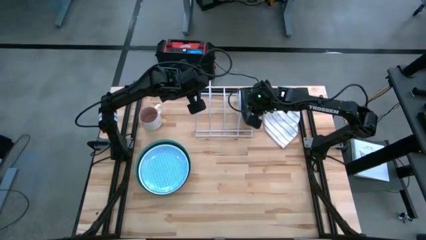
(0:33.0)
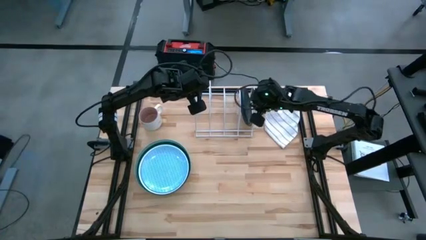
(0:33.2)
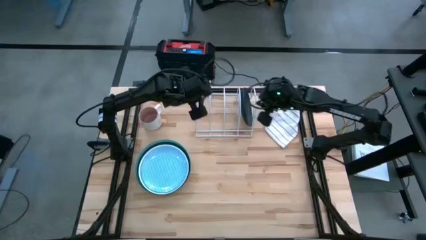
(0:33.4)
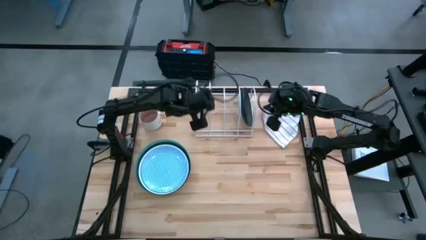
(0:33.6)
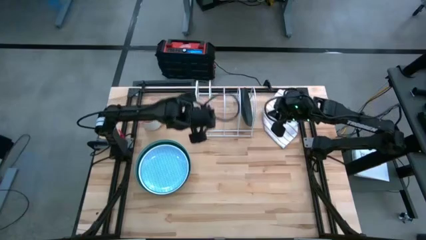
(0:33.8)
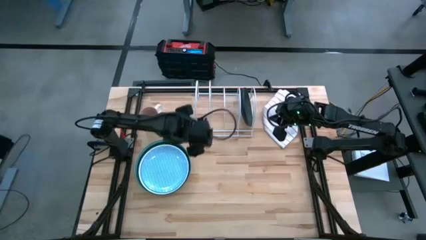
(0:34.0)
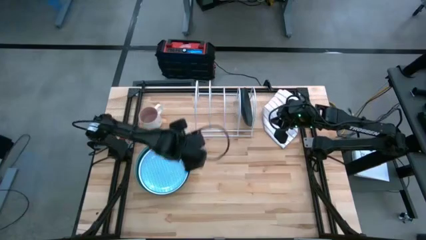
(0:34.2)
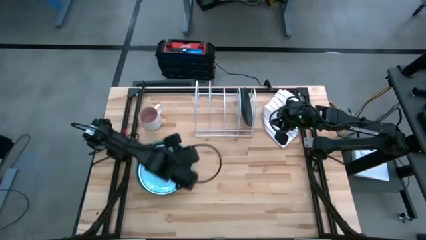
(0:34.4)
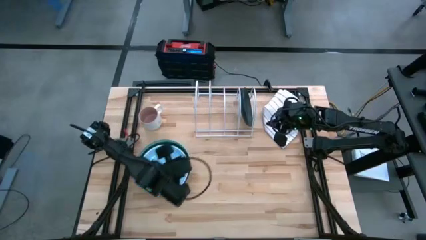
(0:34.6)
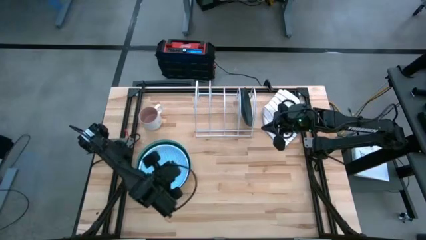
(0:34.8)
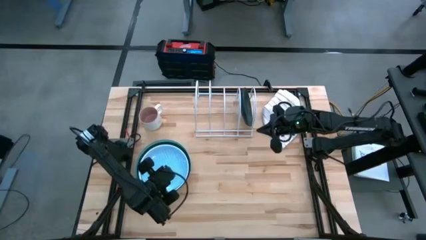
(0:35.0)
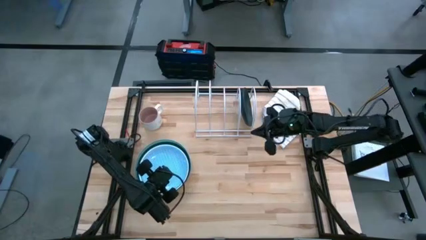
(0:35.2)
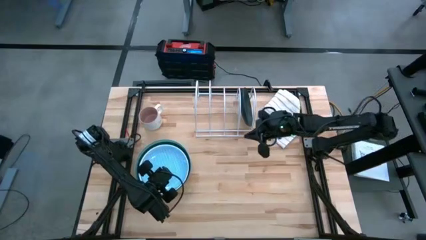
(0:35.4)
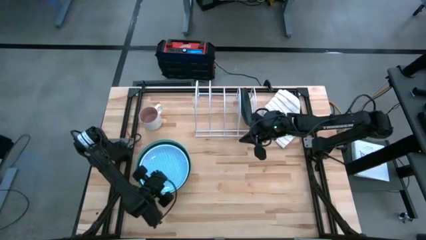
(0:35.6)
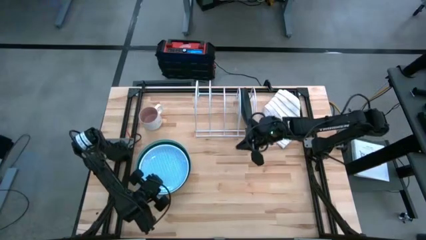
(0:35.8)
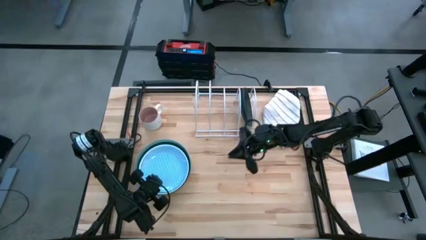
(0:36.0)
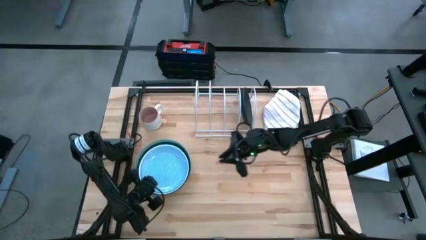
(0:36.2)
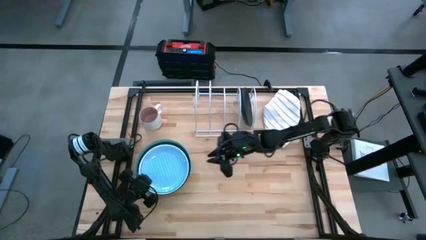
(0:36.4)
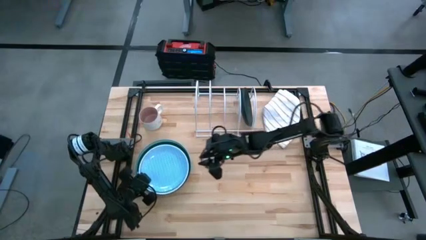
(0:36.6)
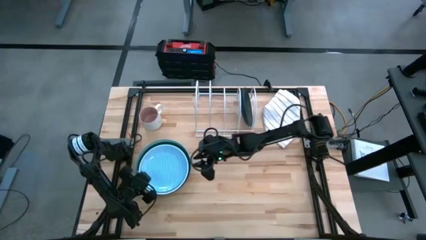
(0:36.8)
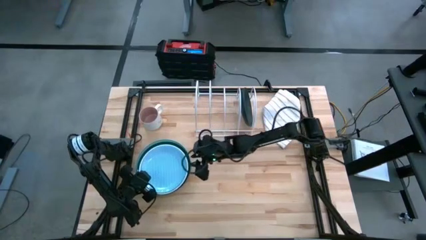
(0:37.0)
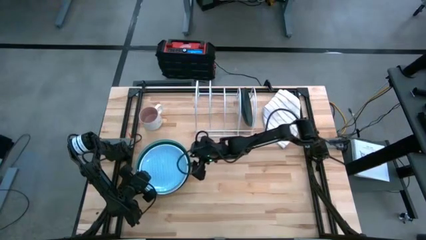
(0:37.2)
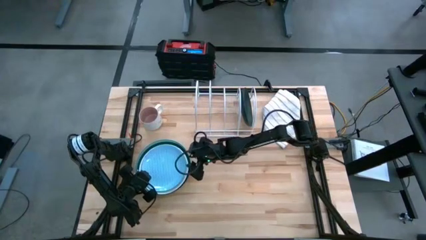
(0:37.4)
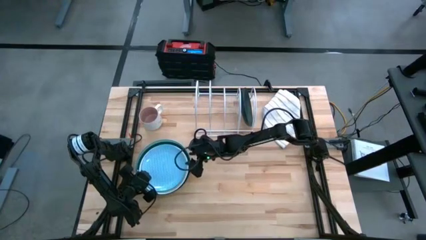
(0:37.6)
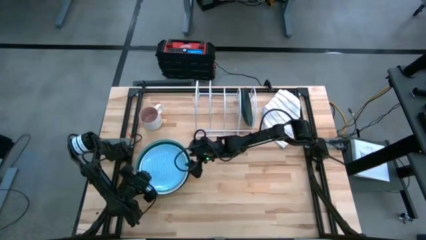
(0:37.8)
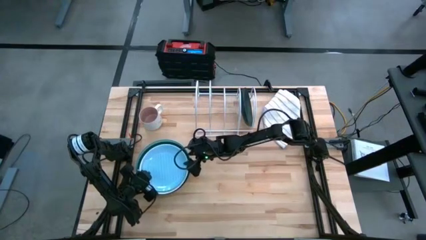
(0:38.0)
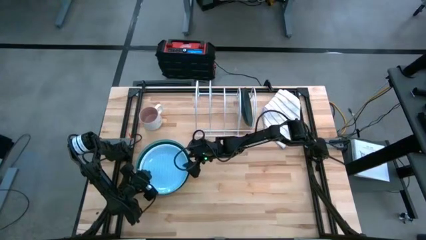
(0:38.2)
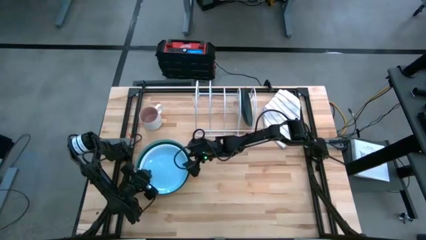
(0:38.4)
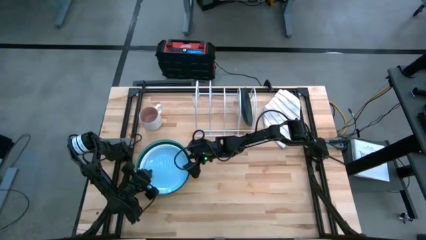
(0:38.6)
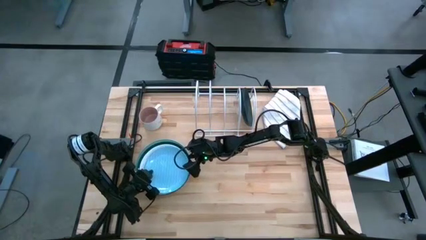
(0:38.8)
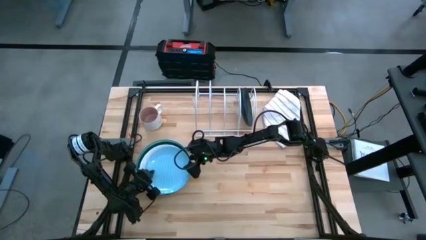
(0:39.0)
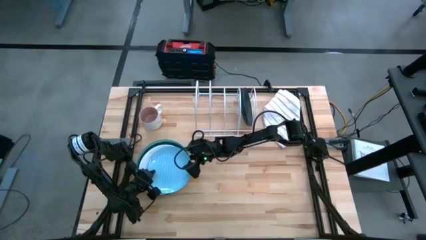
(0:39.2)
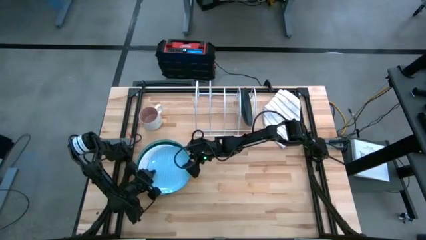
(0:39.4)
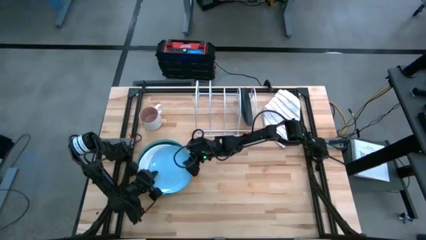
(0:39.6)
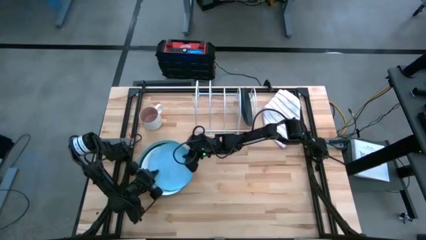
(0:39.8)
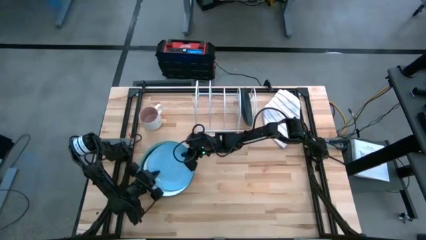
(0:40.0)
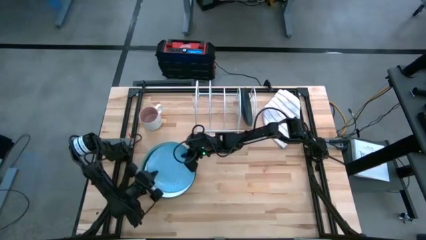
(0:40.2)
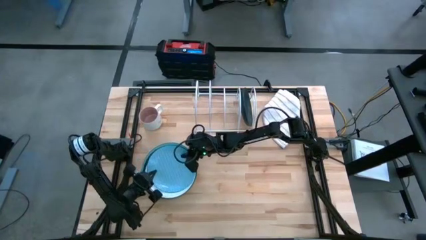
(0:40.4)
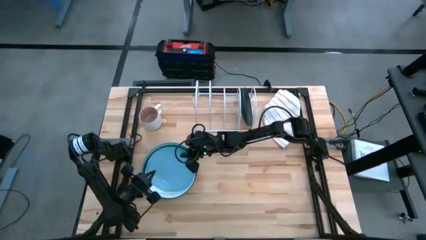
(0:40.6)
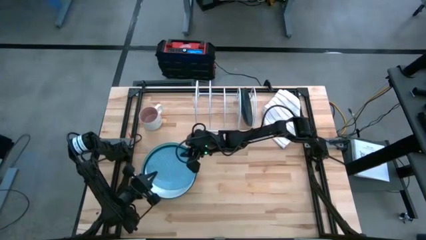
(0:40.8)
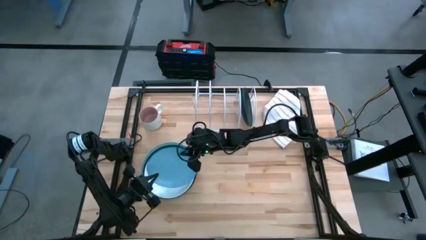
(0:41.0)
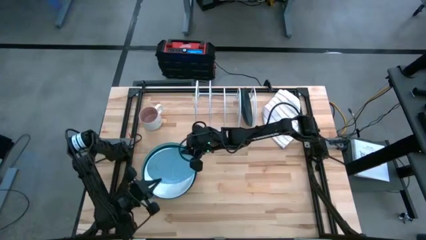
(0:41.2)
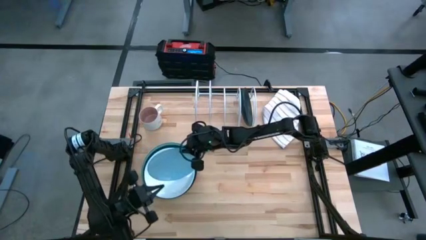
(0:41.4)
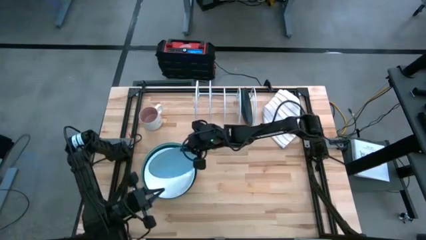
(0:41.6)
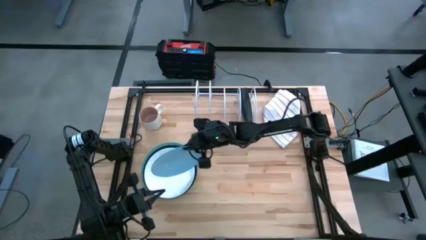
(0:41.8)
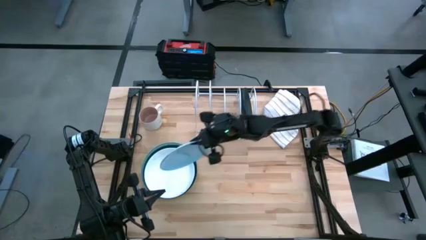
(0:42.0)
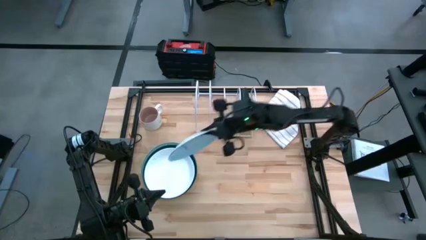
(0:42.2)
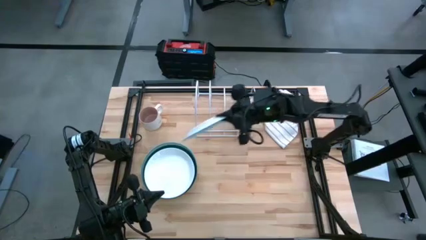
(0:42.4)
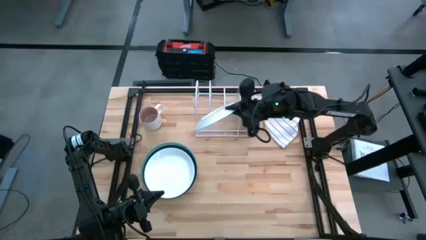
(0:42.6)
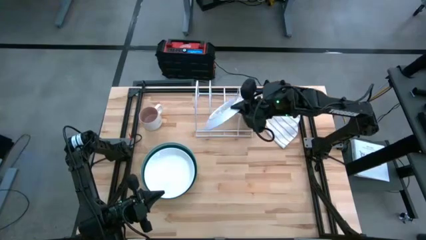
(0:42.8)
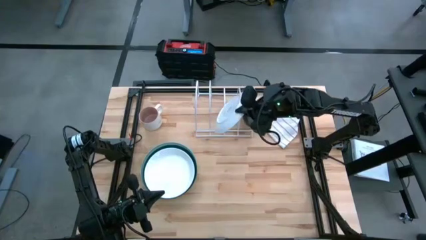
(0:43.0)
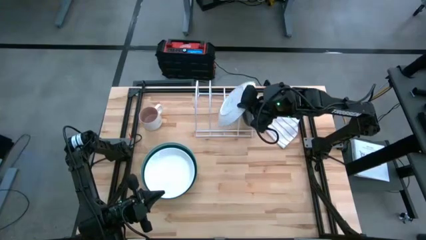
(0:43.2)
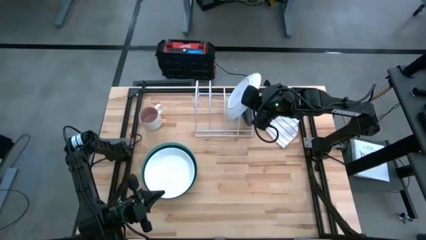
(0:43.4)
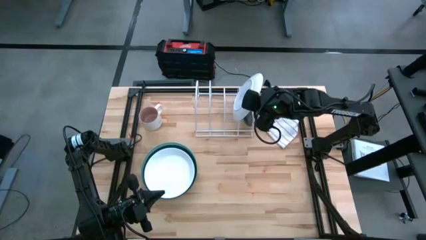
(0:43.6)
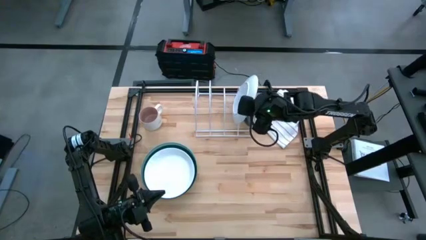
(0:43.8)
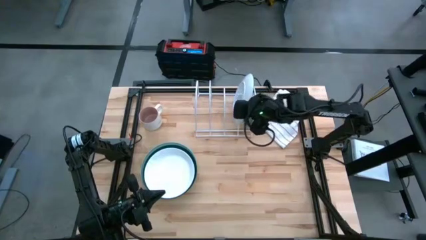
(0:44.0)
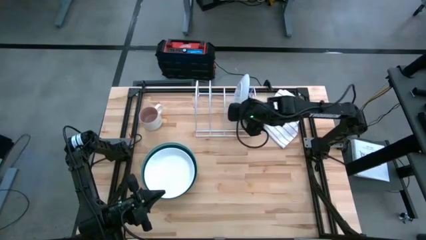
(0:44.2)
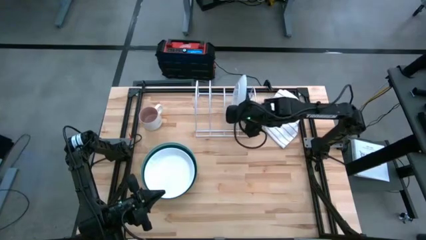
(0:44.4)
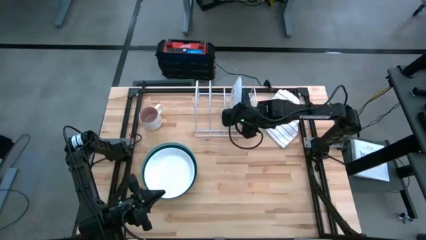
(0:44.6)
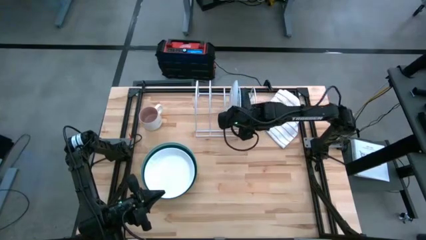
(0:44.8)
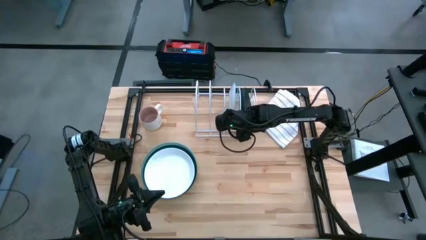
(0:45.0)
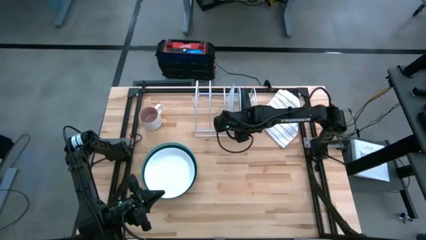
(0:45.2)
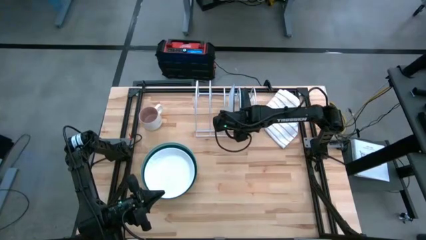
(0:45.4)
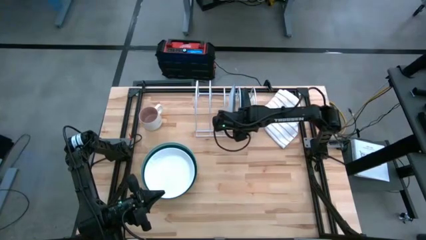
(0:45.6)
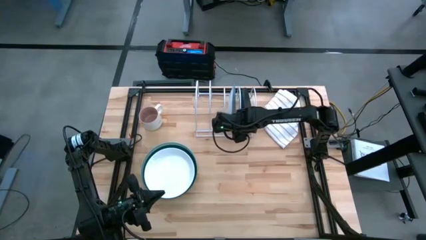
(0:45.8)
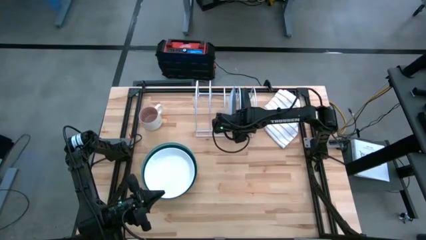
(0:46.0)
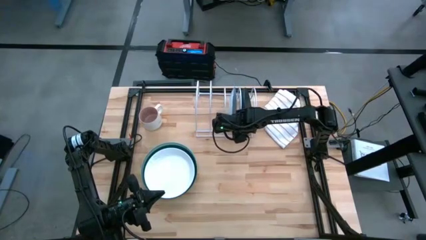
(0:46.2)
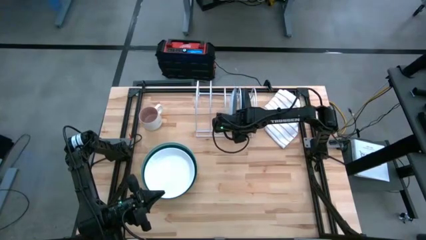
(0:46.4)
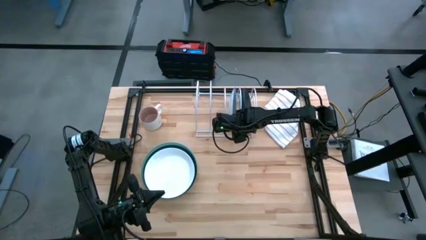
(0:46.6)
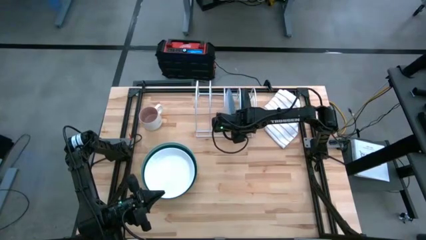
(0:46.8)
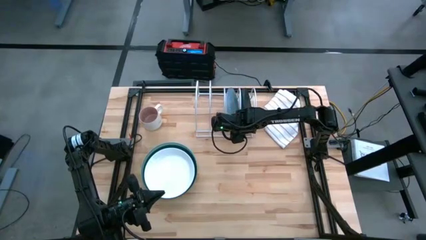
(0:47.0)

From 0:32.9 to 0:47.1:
Task: Sort dishes
Put the blue and white patterned plate in the dishwasher rack

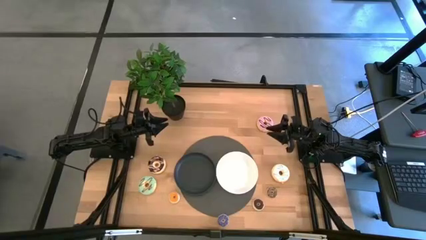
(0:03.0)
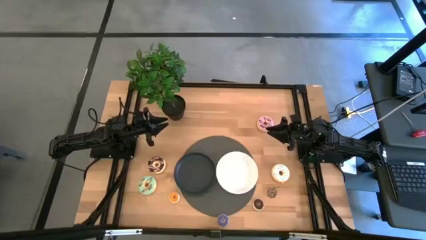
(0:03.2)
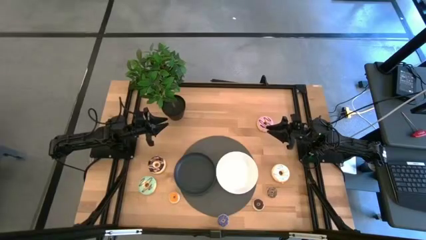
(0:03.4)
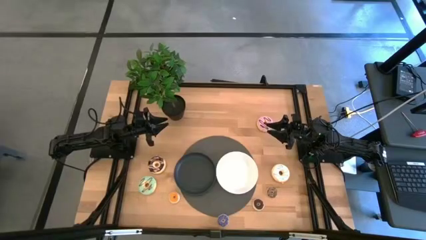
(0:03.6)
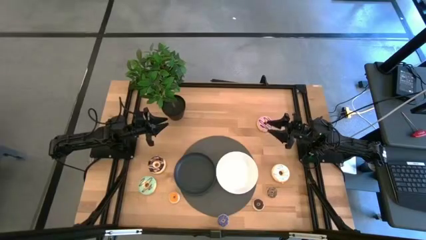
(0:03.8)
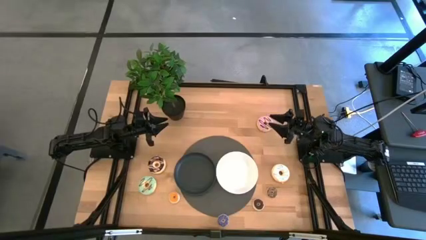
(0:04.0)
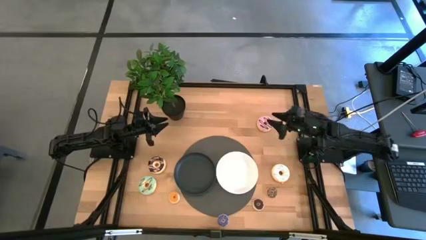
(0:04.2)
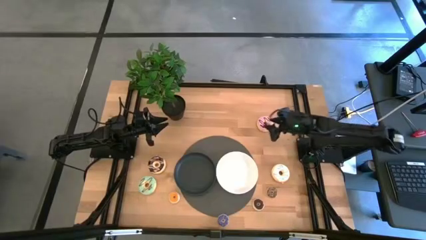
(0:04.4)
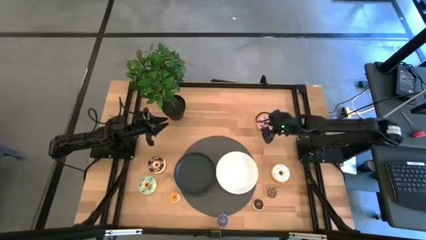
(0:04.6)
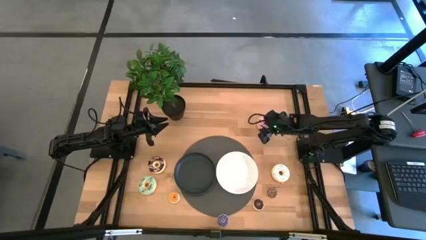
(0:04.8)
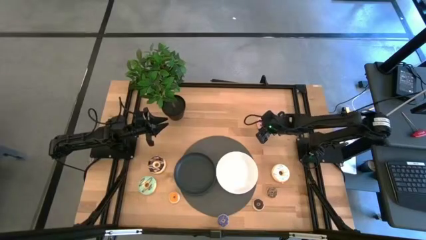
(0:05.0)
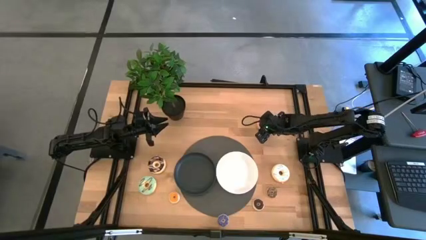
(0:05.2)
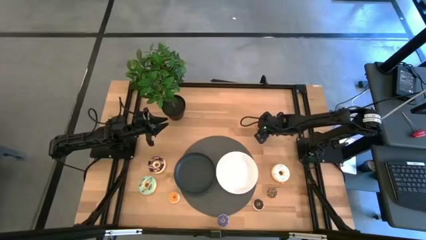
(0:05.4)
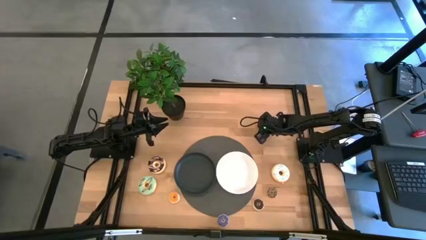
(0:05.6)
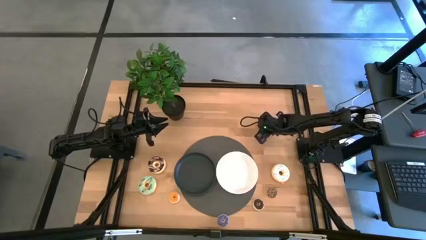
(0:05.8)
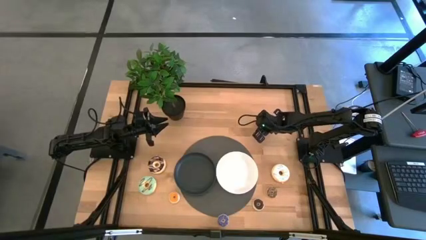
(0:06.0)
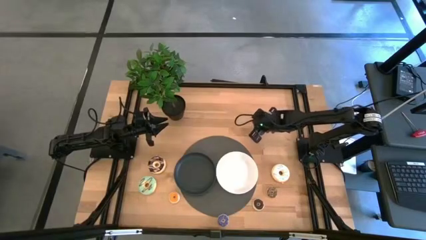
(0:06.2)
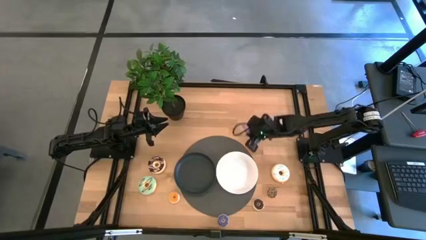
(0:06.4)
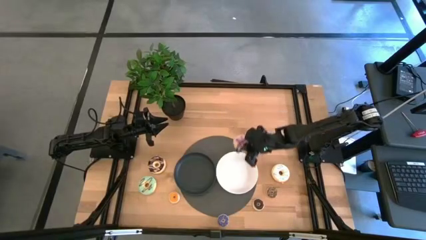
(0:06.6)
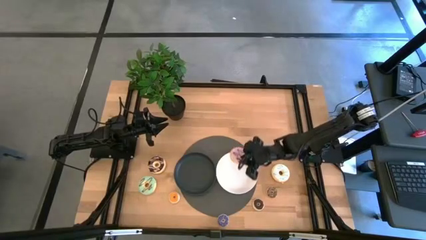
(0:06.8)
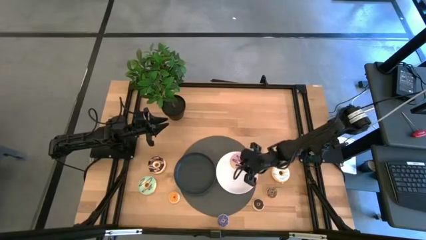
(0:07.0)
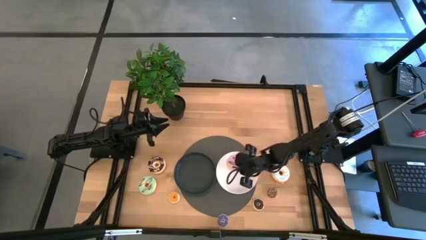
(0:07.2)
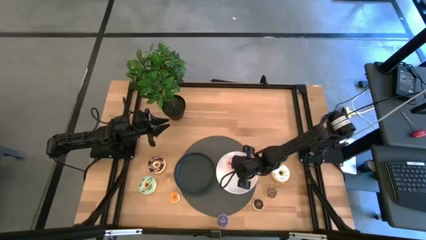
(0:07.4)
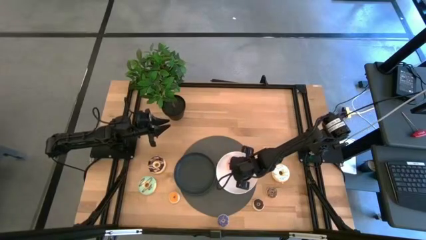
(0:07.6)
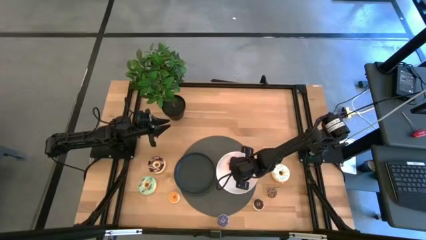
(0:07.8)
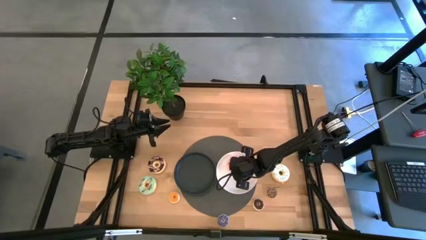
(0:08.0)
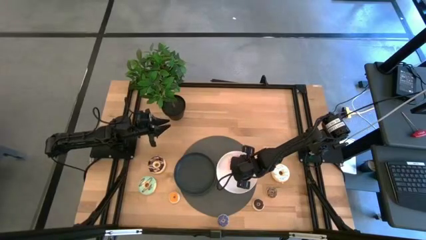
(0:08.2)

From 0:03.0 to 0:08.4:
Task: Pick & Place donuts
Put the large purple donut onto the white plate
